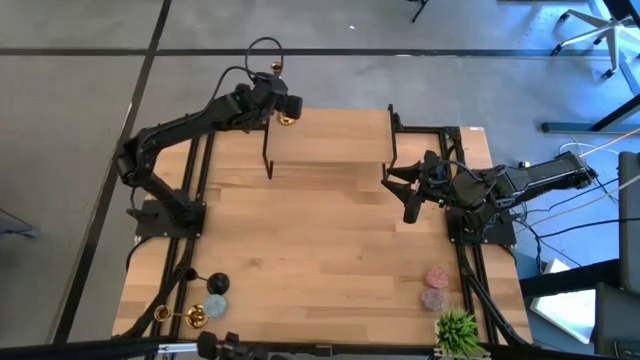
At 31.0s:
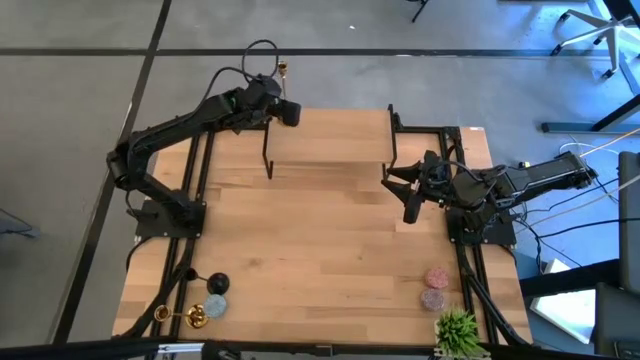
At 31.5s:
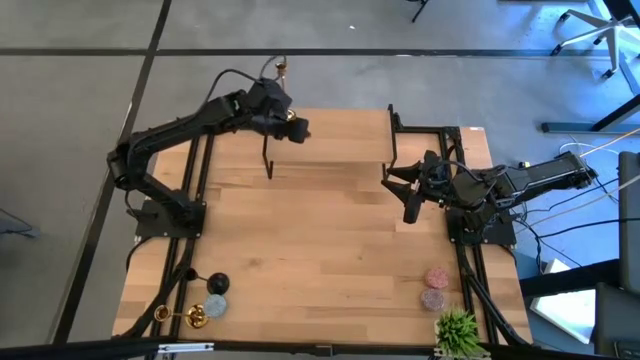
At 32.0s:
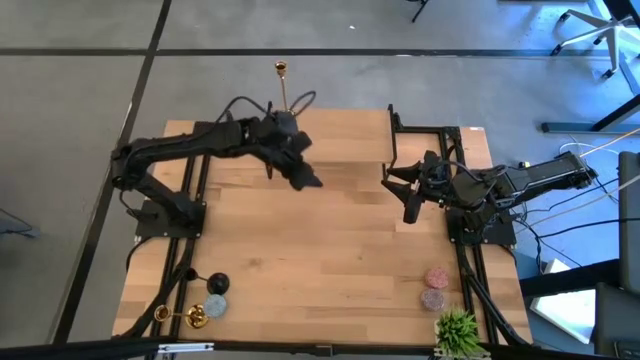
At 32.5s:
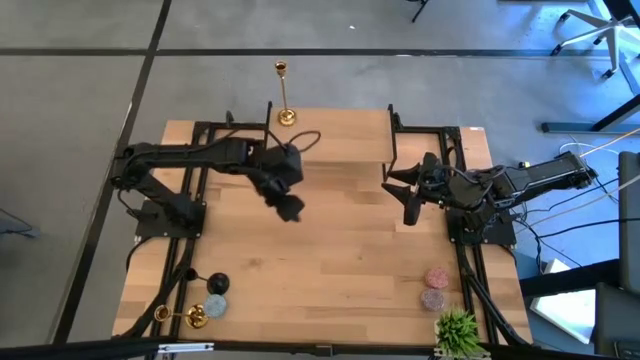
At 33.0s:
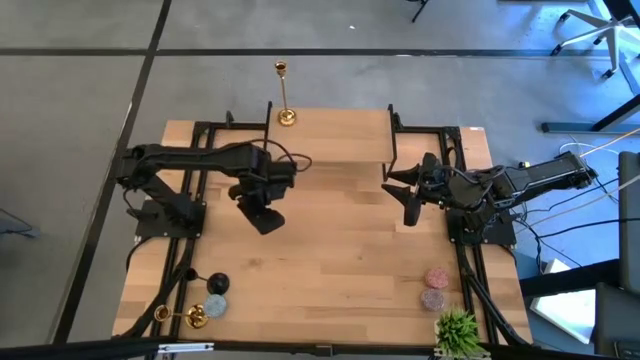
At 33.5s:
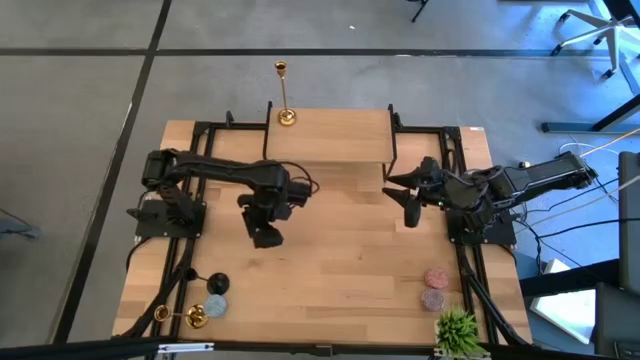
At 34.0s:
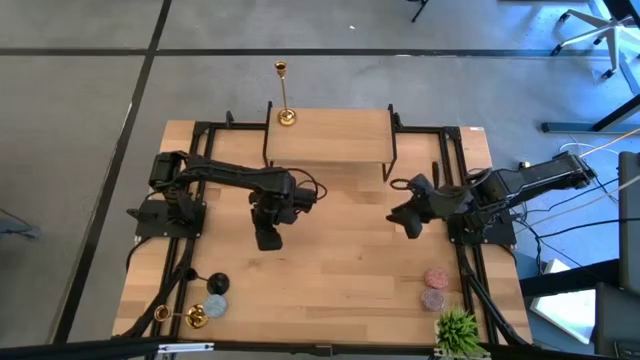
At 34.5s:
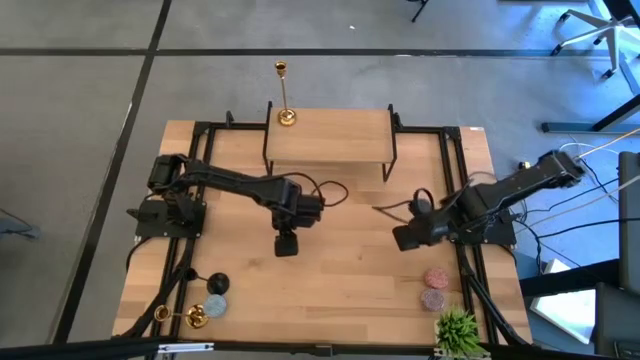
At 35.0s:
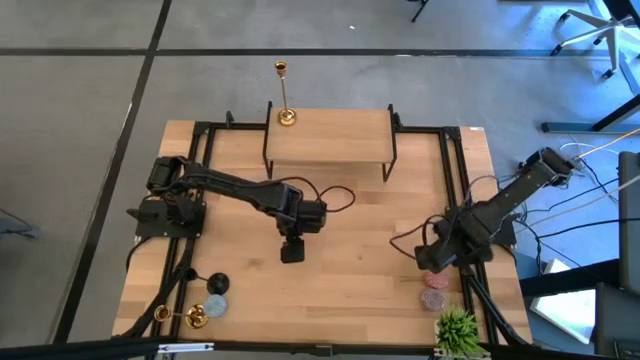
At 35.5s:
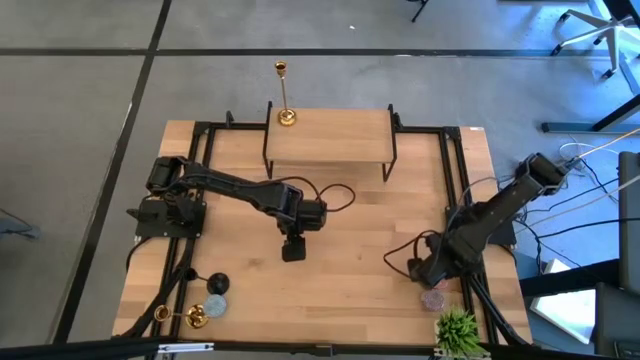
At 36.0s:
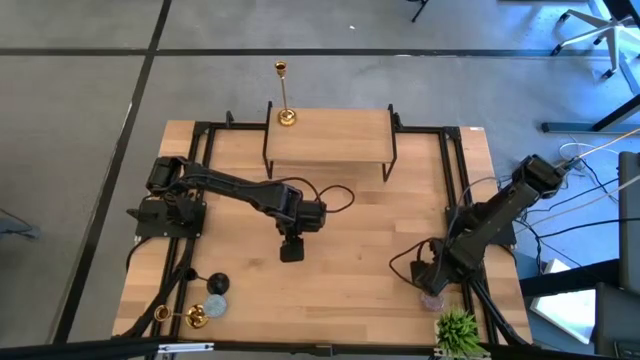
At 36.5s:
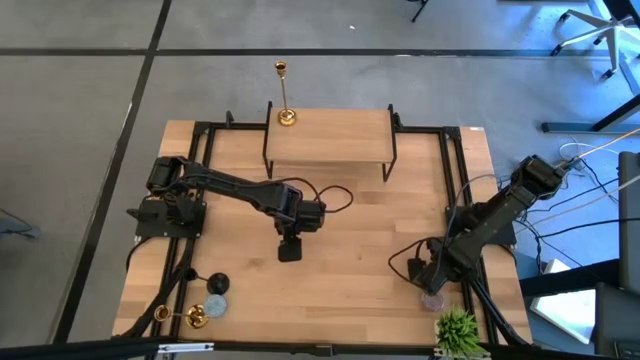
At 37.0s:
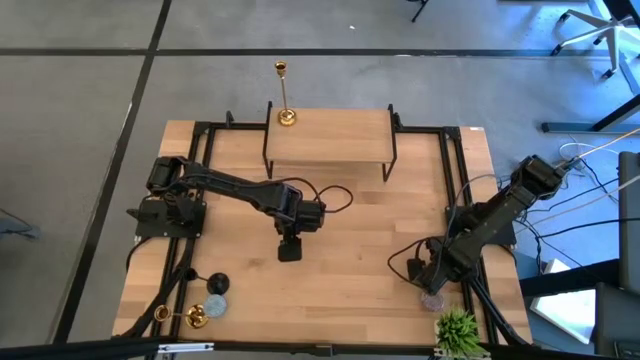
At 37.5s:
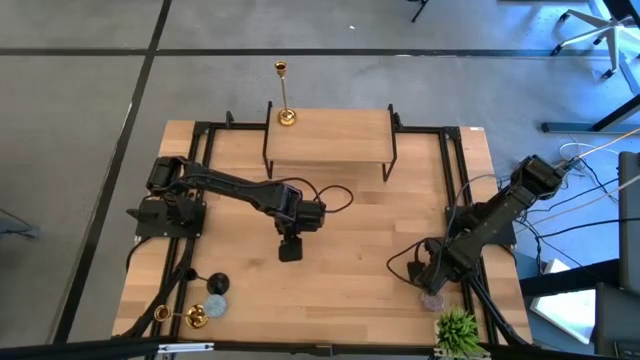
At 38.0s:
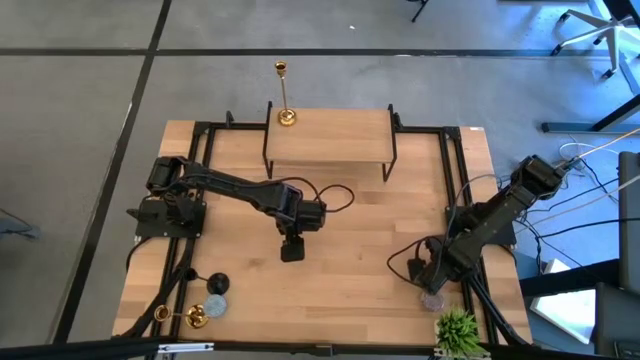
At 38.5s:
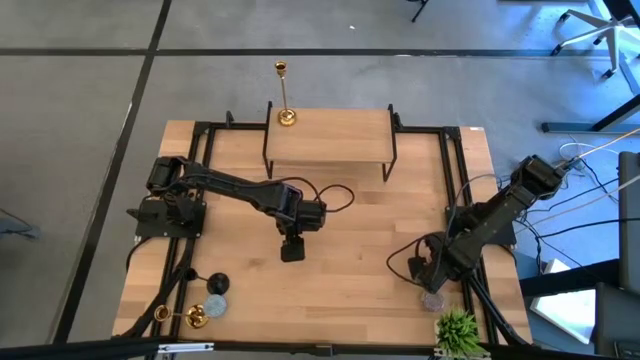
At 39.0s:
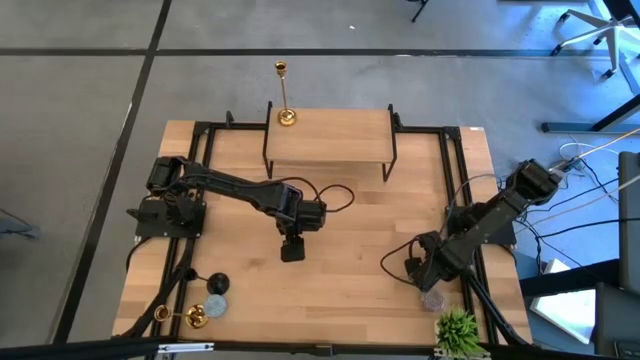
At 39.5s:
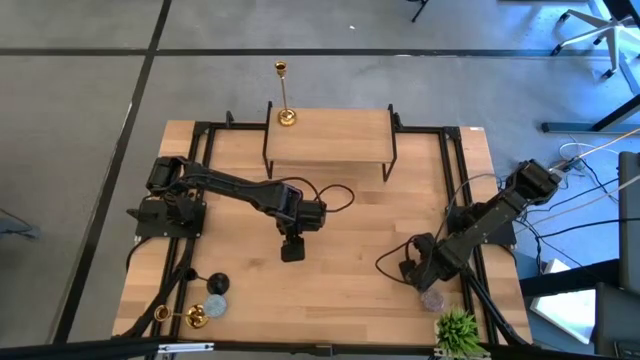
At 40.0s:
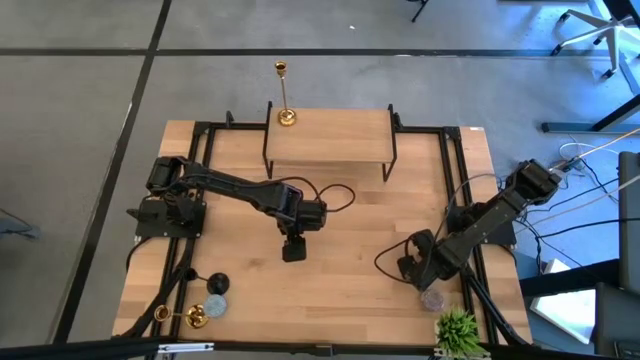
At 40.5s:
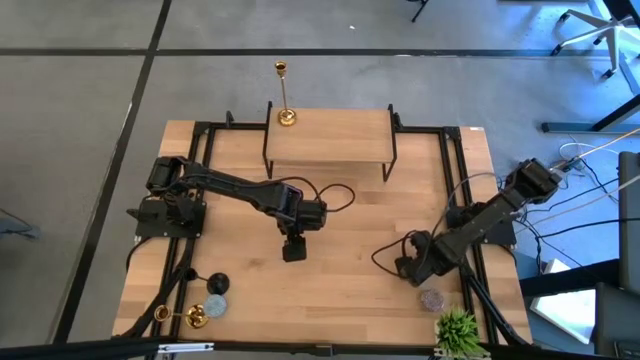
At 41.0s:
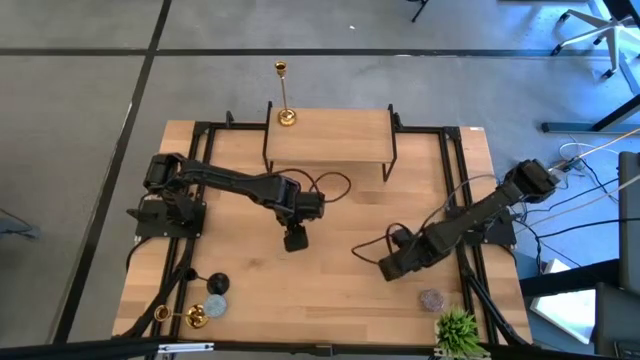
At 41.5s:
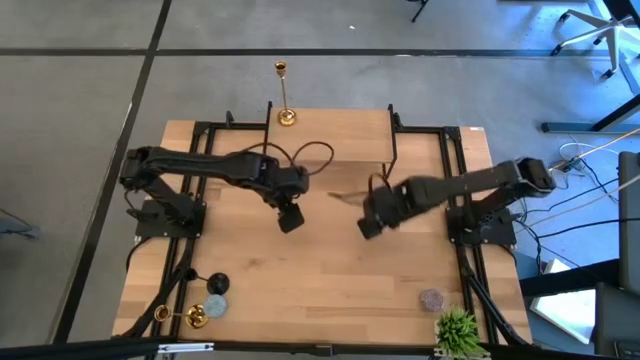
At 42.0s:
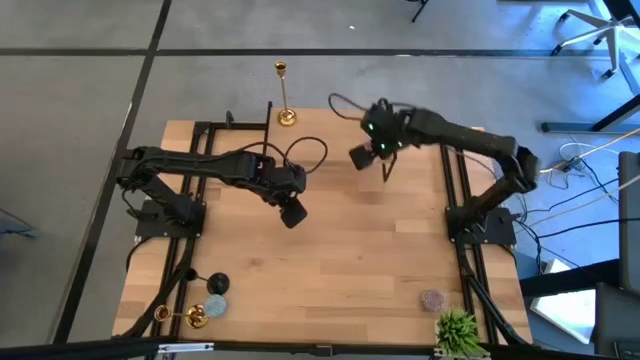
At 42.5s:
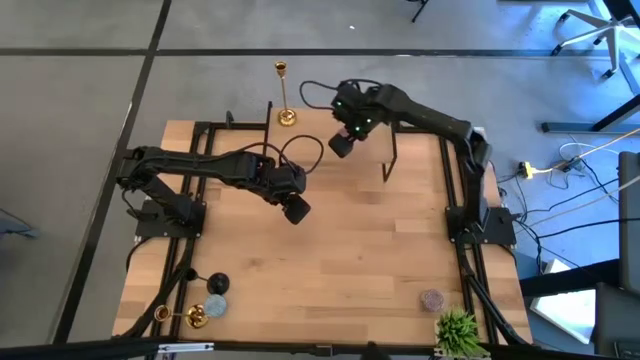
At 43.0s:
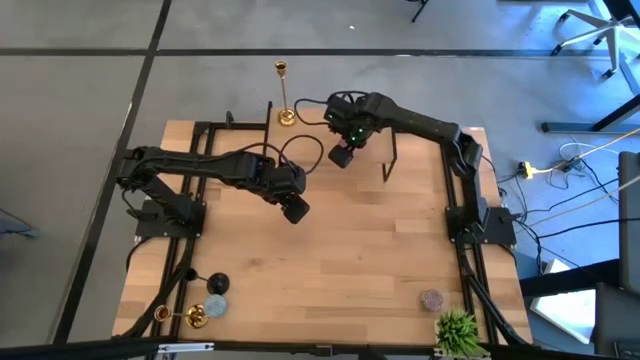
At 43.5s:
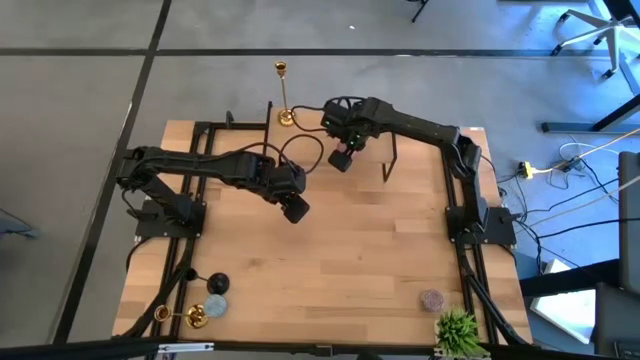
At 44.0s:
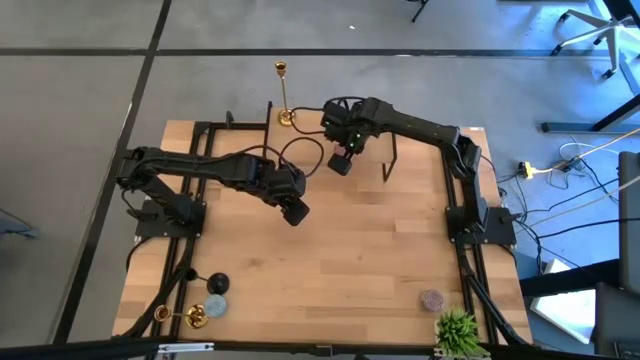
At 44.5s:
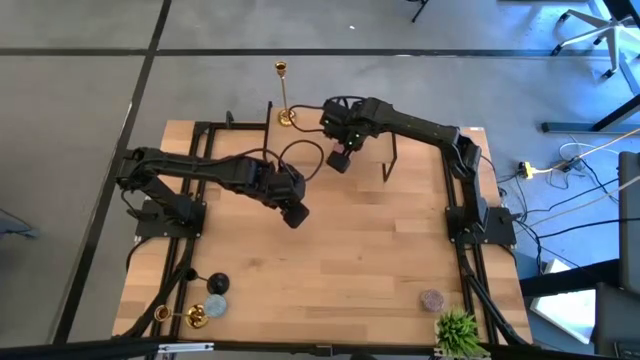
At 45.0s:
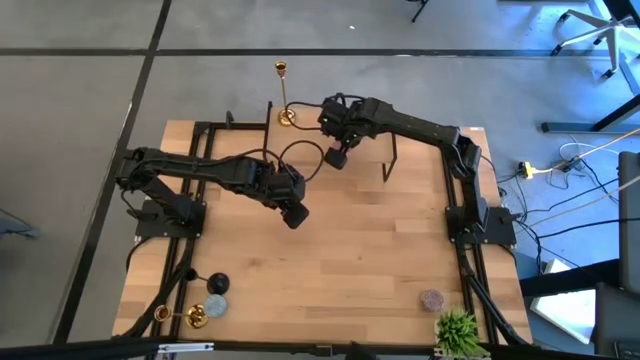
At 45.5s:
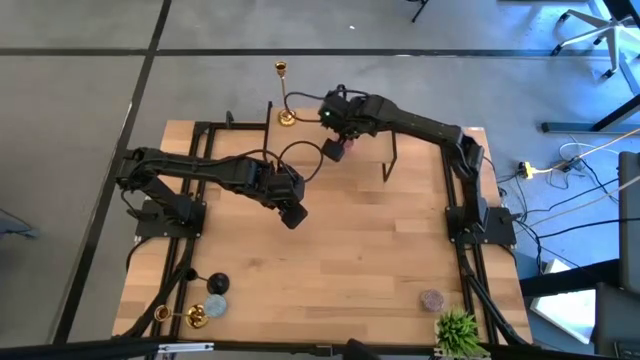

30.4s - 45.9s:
Task: Pick & Place candle stick holders
Put the pink candle on the shelf

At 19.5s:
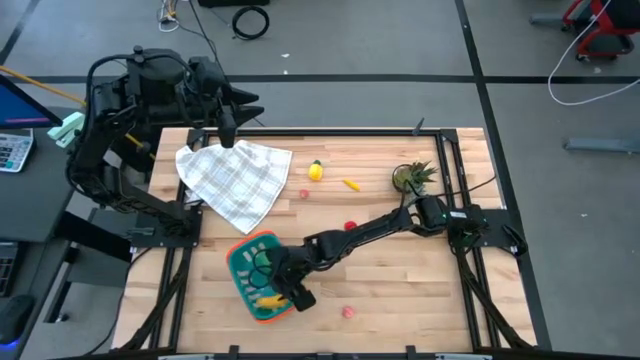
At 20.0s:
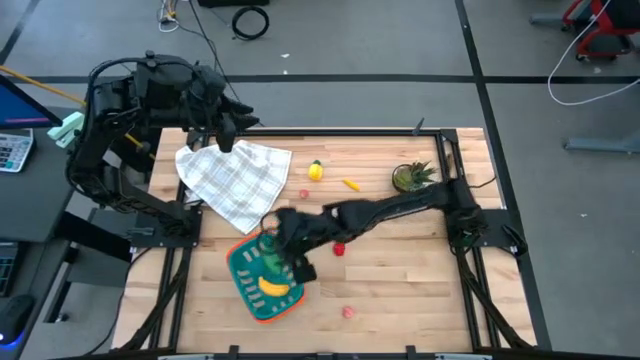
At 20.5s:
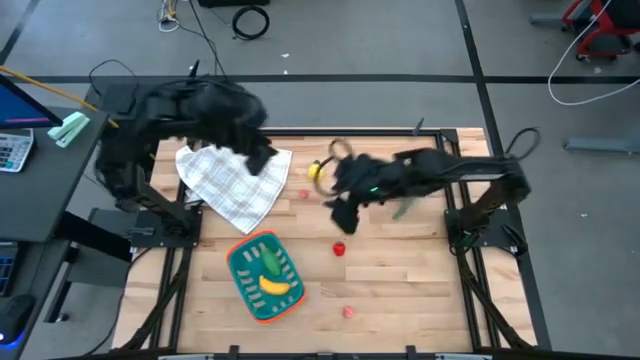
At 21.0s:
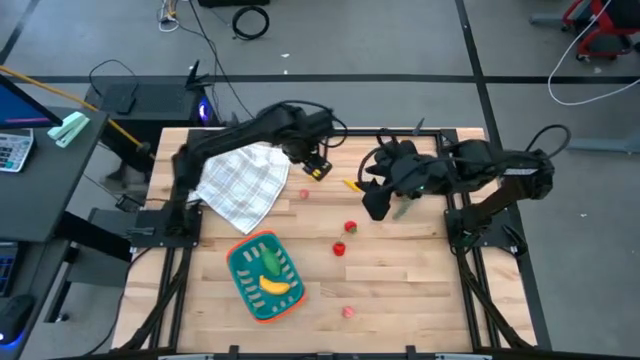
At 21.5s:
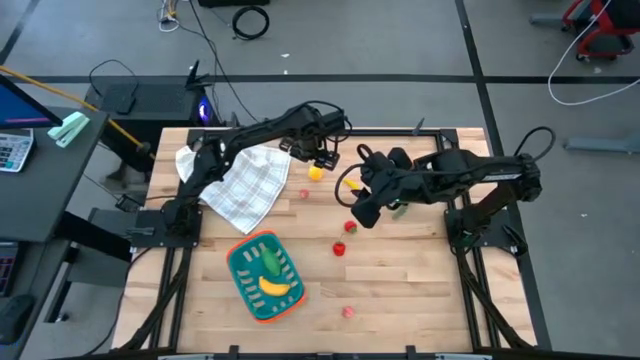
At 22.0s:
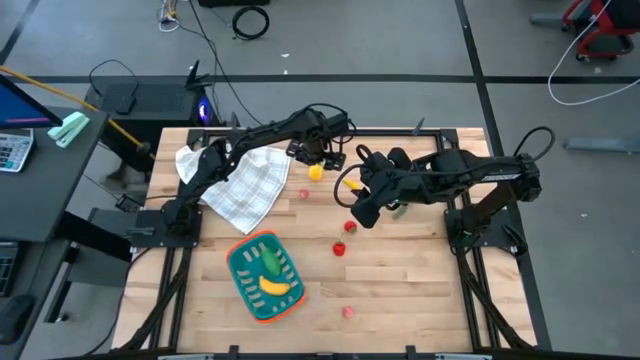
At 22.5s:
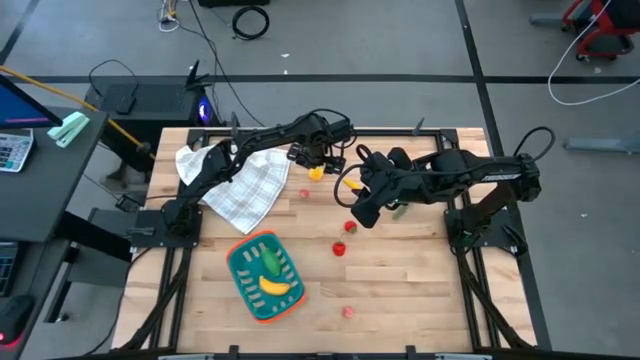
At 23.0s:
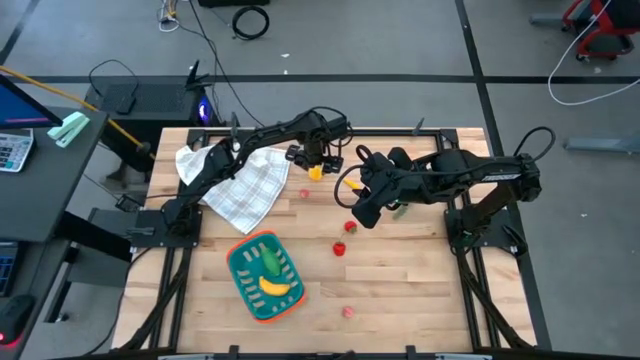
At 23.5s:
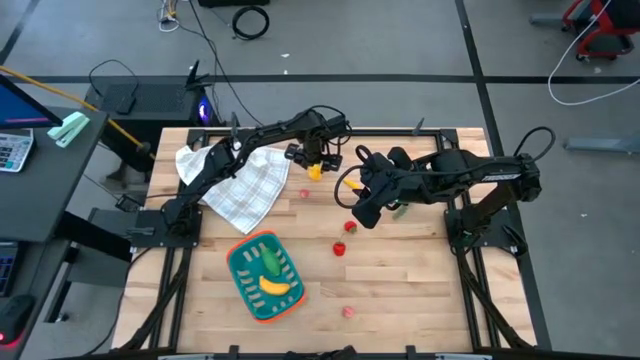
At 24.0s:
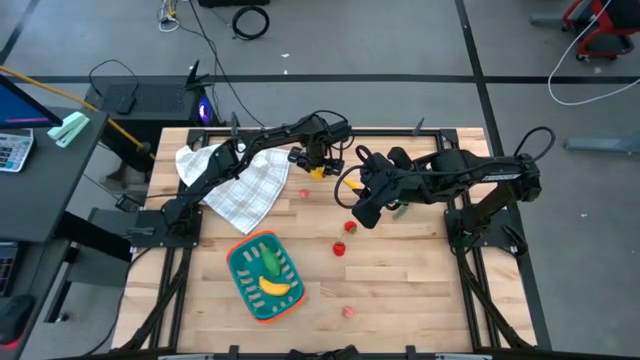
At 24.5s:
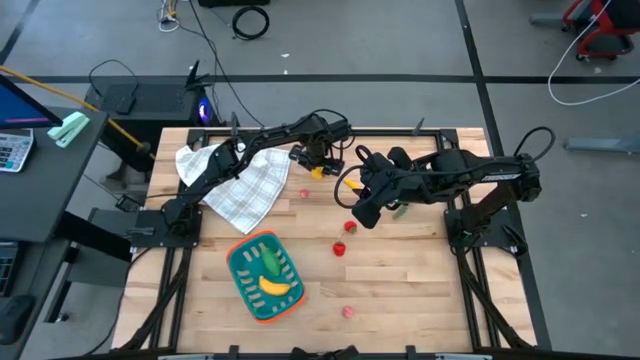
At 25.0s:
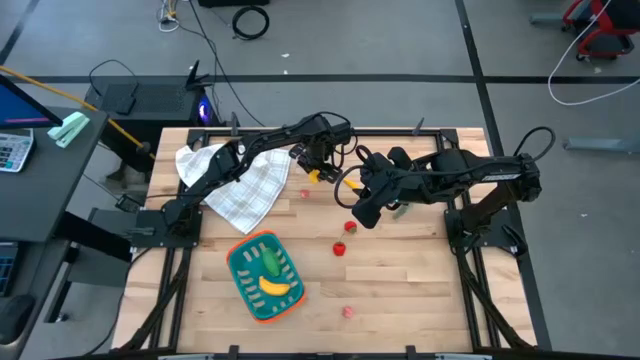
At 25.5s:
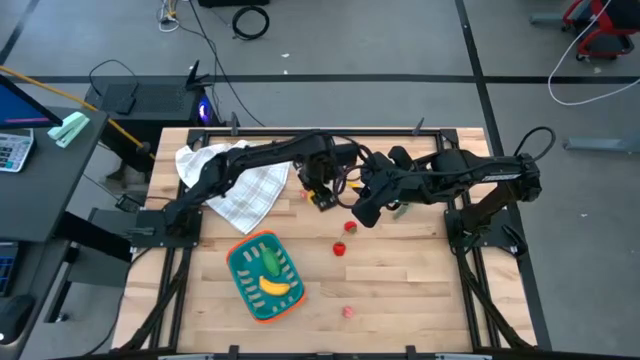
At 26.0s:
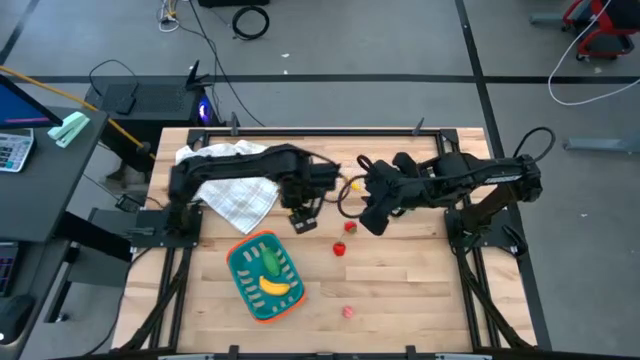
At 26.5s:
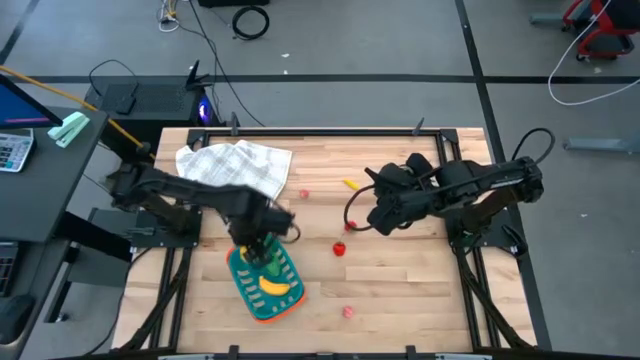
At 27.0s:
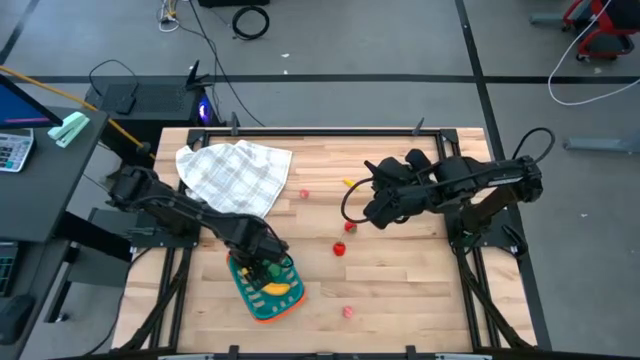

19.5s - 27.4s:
Task: Pick and placing Produce into tupperware
Put the yellow pineapple into the blue basket
